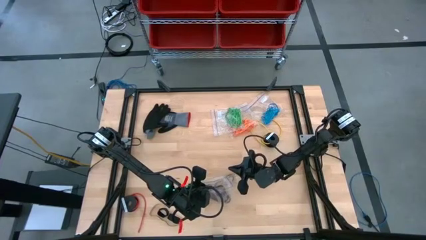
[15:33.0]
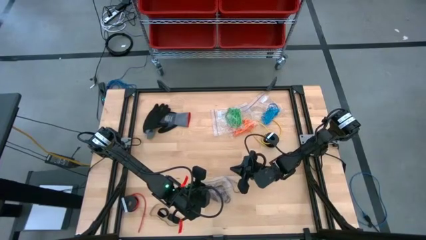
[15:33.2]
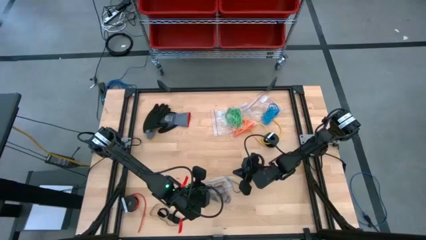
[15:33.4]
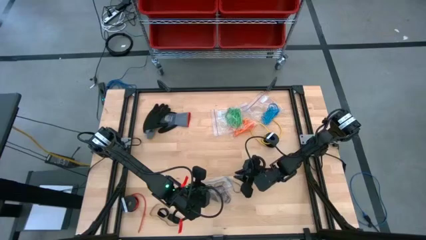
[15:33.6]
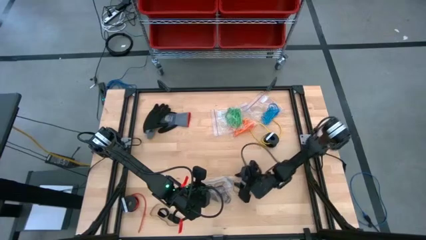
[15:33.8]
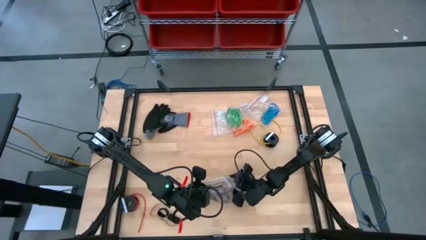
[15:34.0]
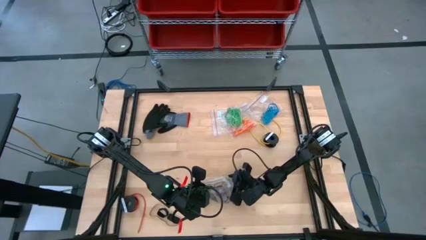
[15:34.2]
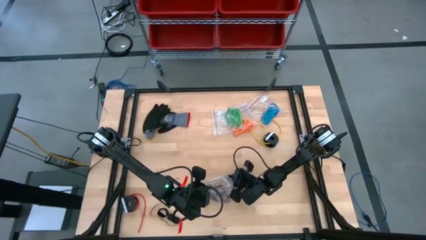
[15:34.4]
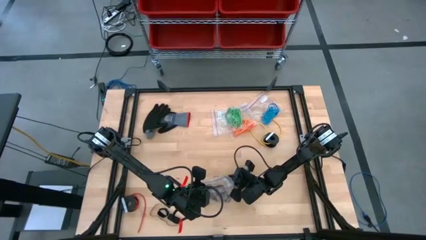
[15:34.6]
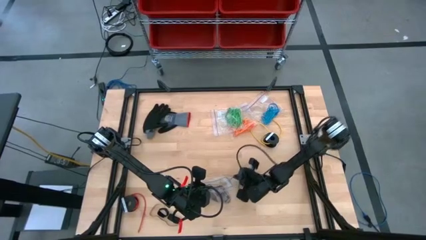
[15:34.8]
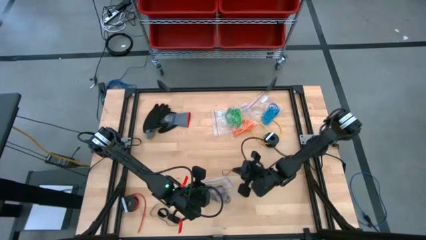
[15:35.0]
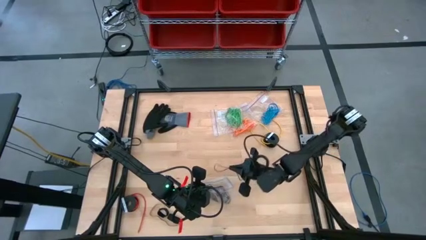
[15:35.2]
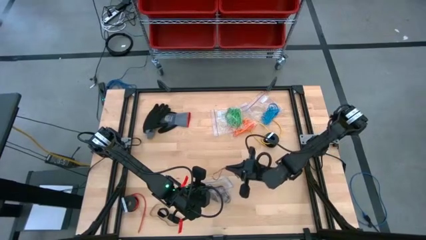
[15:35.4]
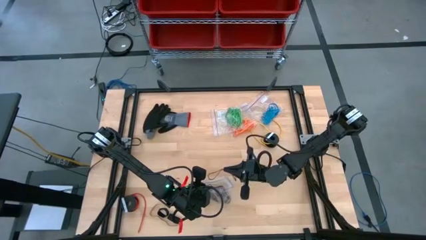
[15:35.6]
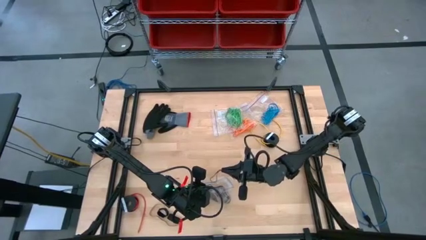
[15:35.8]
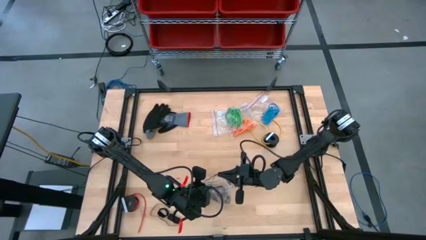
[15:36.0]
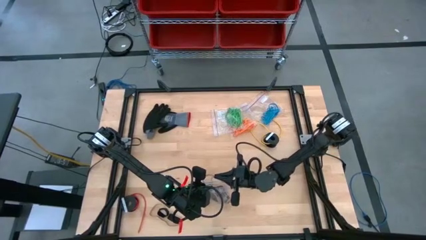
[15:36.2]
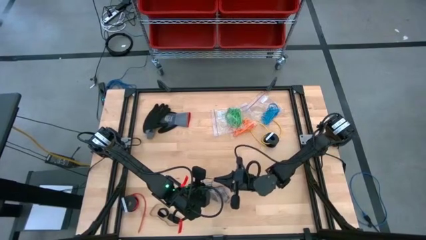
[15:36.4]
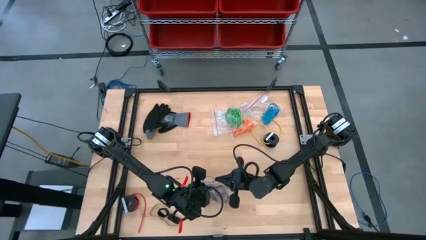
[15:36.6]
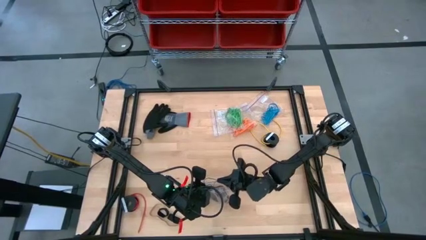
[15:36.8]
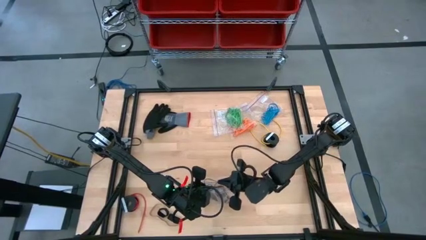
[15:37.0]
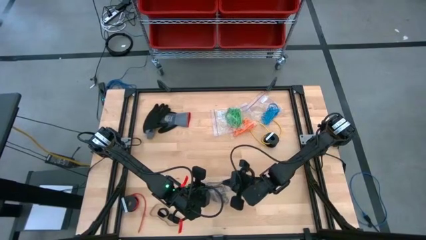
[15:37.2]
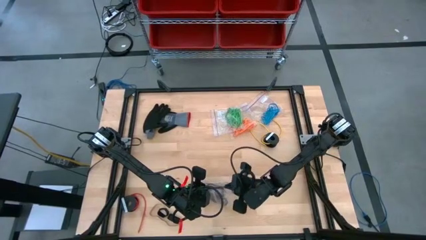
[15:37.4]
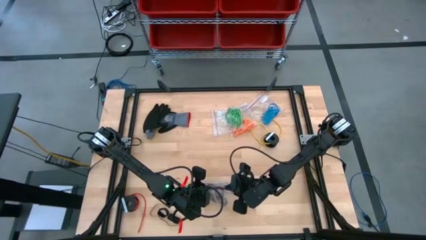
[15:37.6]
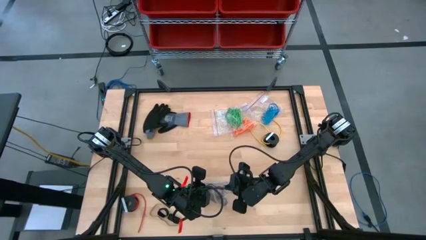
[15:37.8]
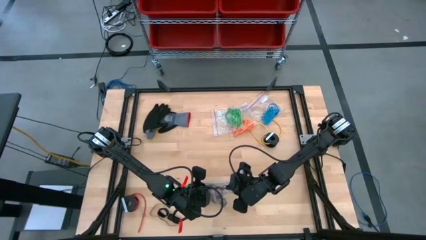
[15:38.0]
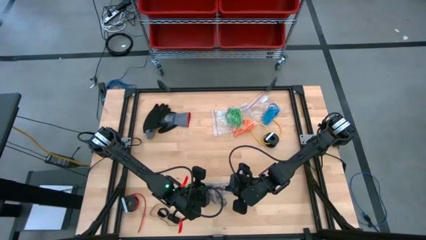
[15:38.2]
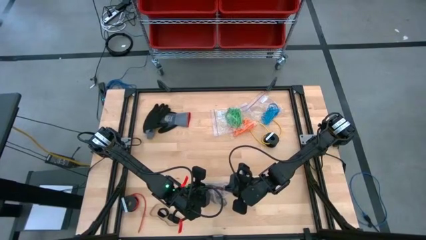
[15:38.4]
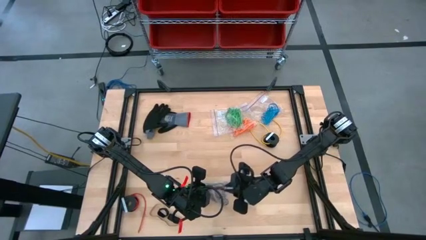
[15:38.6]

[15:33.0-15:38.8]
Task: Sort rubber bands
Put the black rubber band into the transparent zip bag

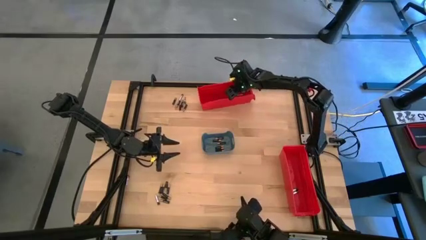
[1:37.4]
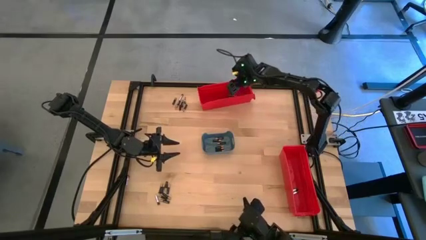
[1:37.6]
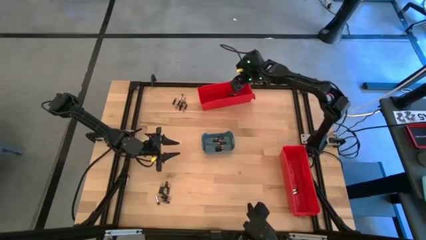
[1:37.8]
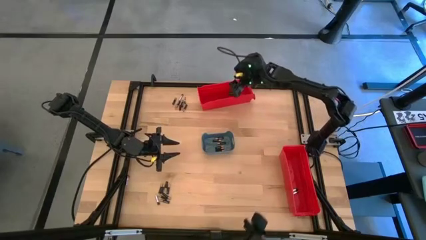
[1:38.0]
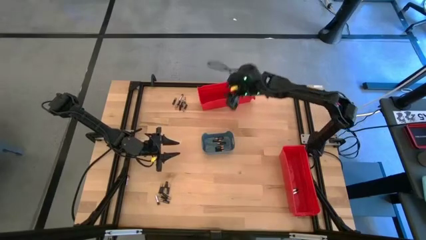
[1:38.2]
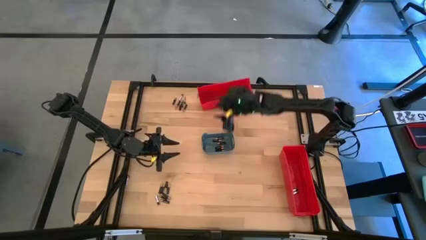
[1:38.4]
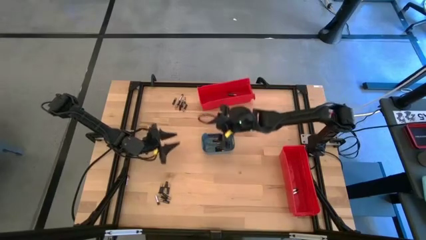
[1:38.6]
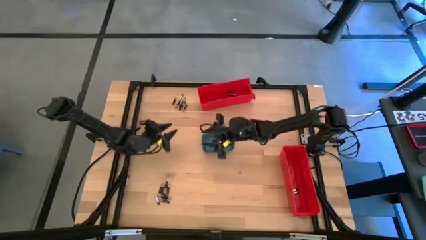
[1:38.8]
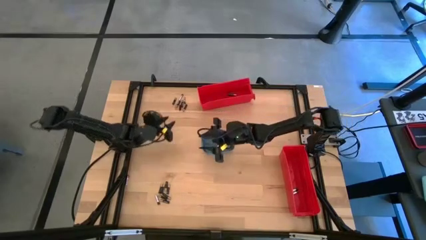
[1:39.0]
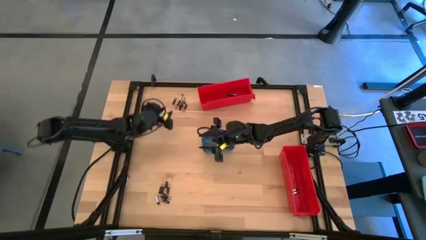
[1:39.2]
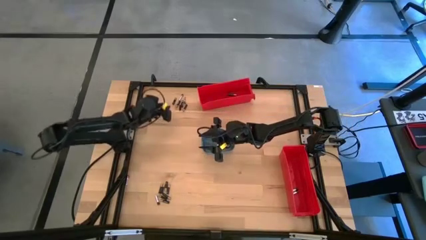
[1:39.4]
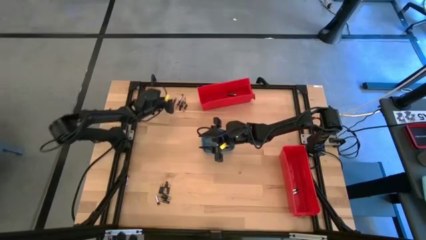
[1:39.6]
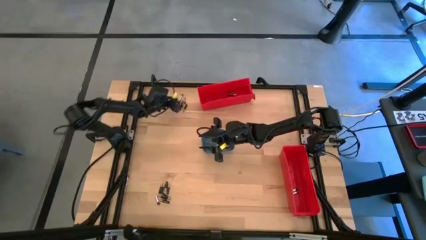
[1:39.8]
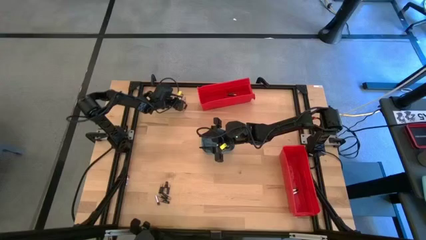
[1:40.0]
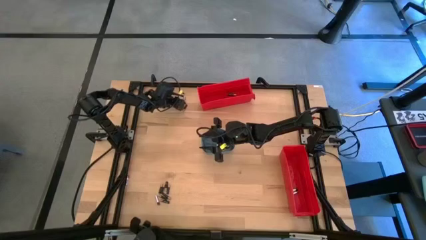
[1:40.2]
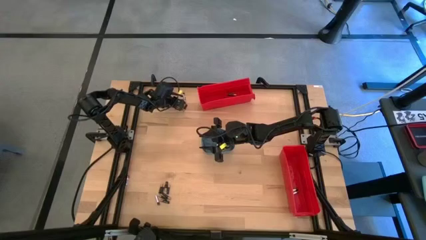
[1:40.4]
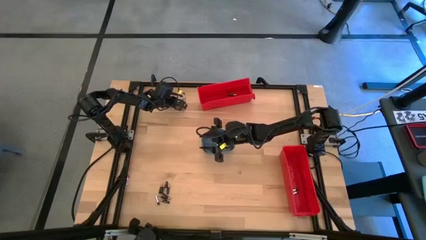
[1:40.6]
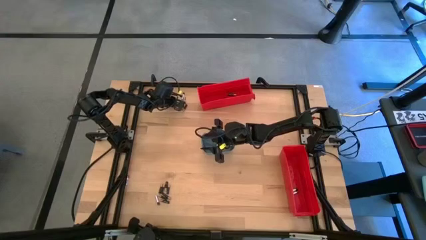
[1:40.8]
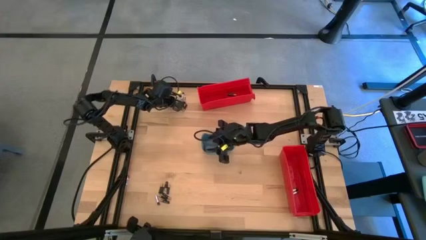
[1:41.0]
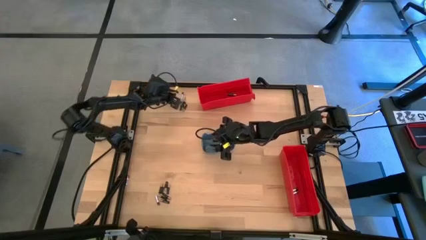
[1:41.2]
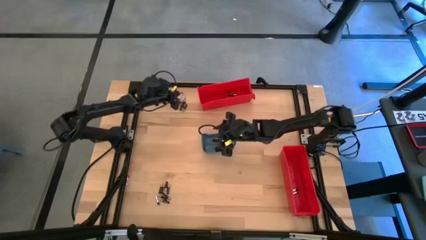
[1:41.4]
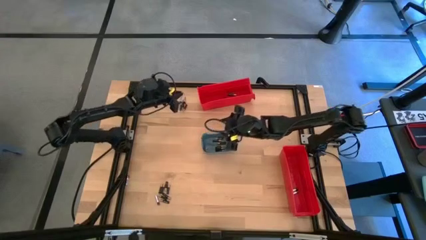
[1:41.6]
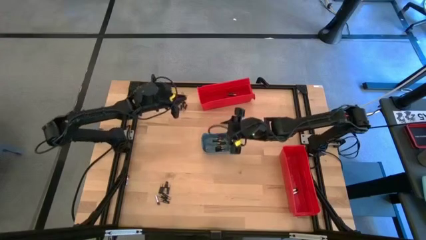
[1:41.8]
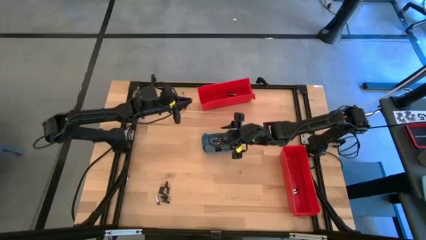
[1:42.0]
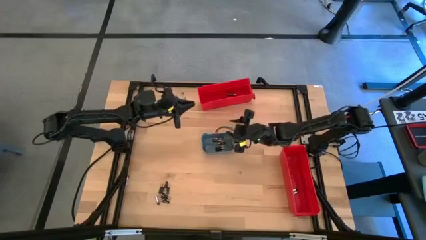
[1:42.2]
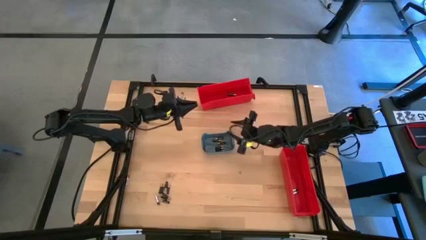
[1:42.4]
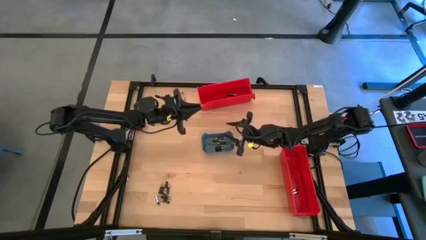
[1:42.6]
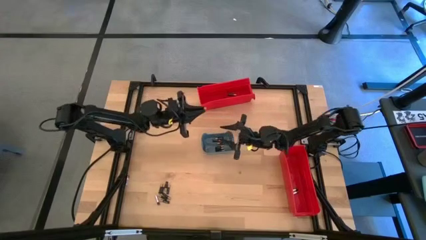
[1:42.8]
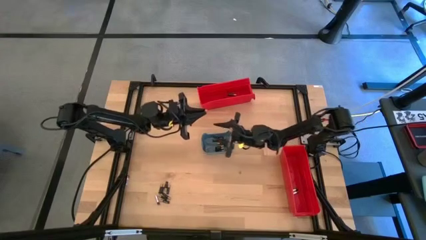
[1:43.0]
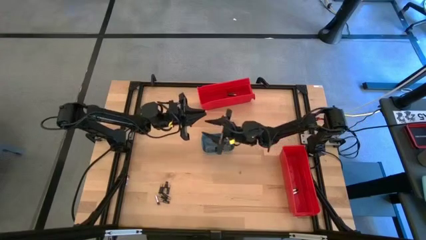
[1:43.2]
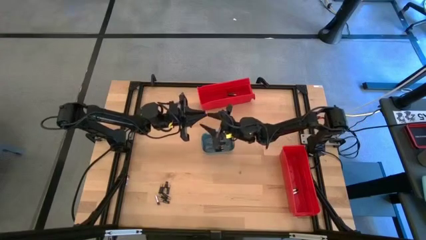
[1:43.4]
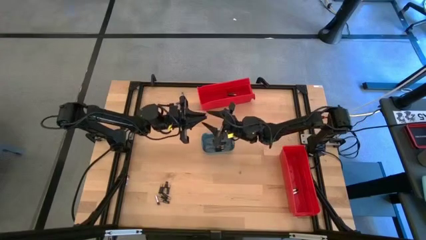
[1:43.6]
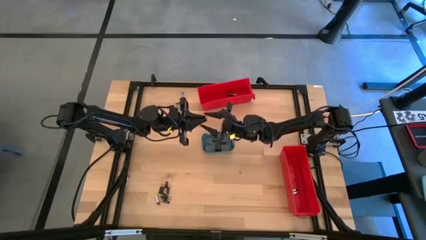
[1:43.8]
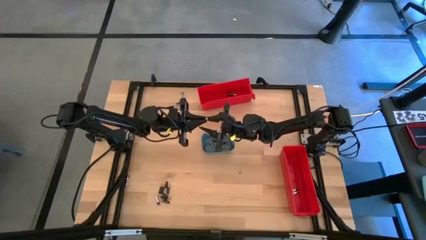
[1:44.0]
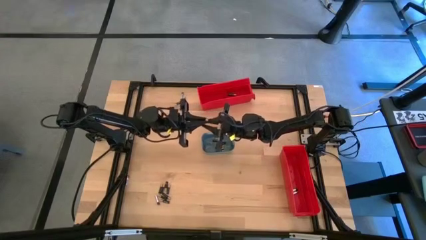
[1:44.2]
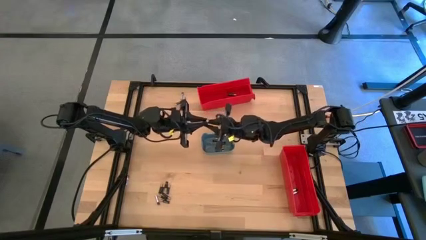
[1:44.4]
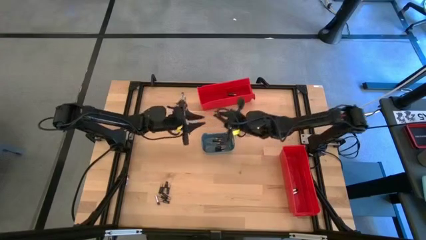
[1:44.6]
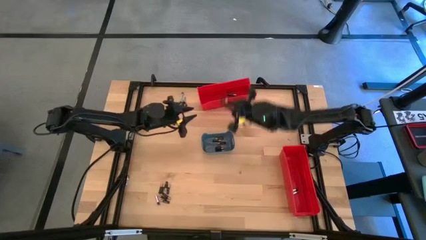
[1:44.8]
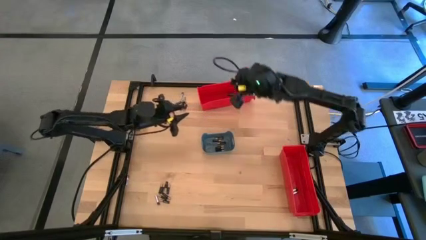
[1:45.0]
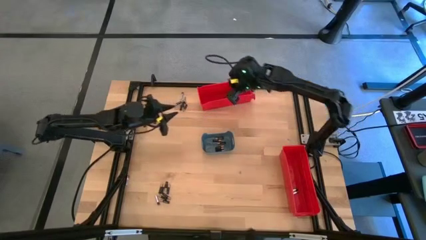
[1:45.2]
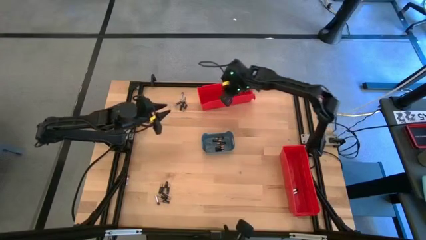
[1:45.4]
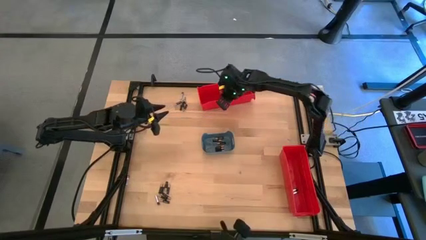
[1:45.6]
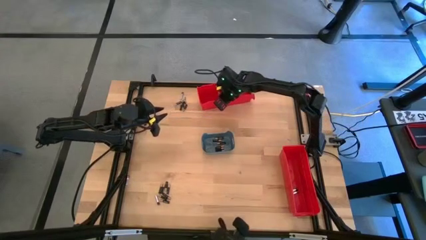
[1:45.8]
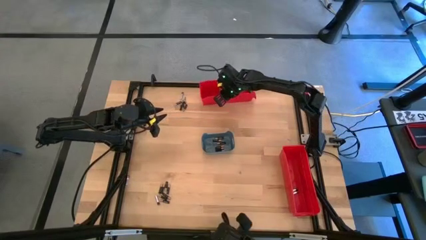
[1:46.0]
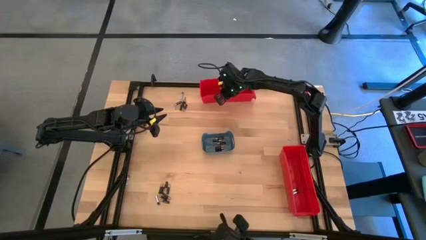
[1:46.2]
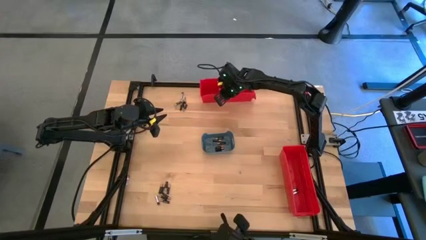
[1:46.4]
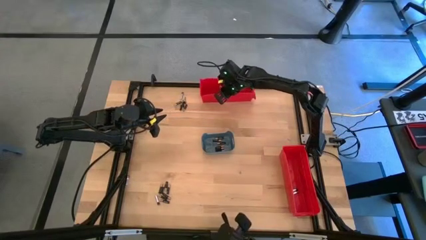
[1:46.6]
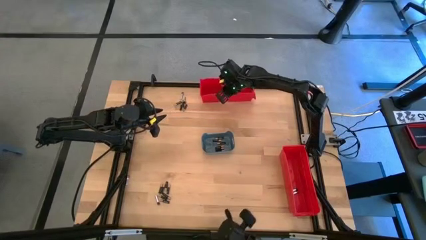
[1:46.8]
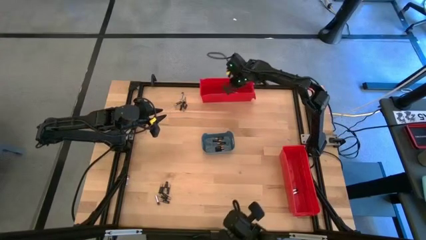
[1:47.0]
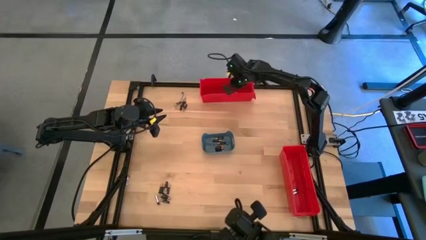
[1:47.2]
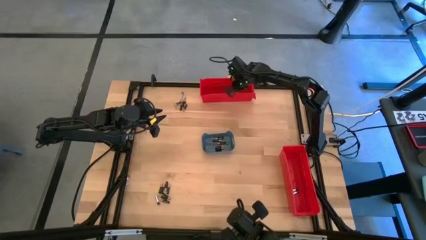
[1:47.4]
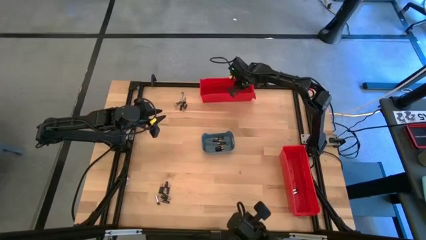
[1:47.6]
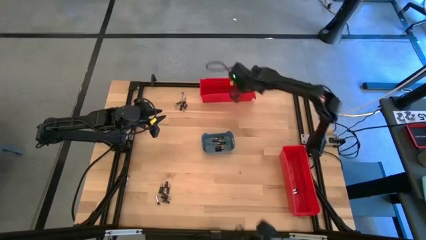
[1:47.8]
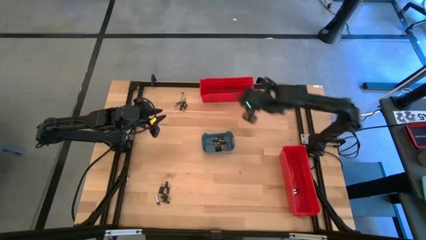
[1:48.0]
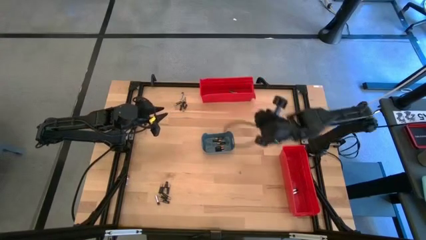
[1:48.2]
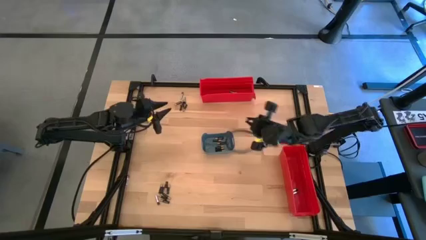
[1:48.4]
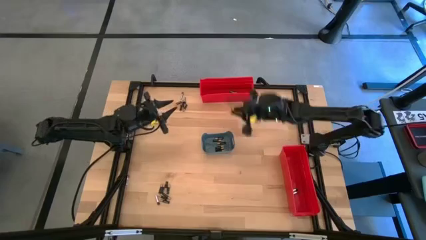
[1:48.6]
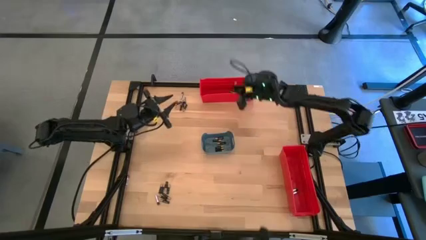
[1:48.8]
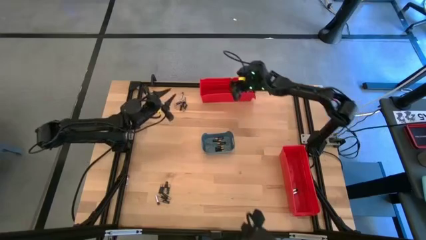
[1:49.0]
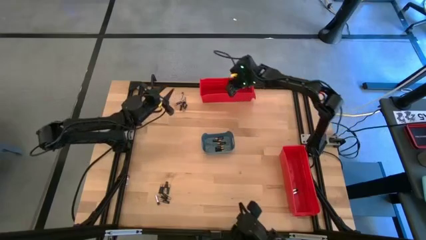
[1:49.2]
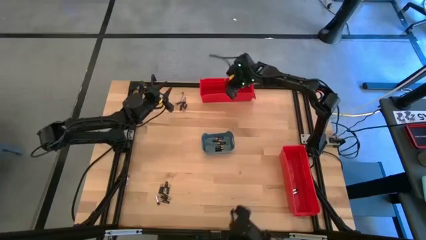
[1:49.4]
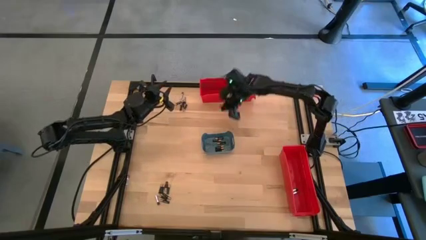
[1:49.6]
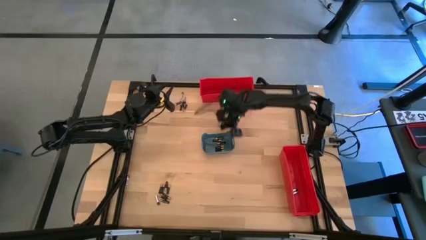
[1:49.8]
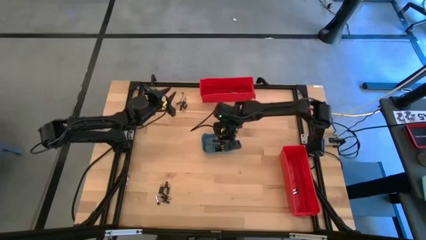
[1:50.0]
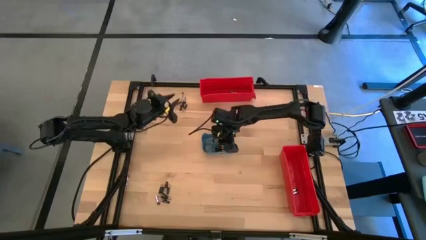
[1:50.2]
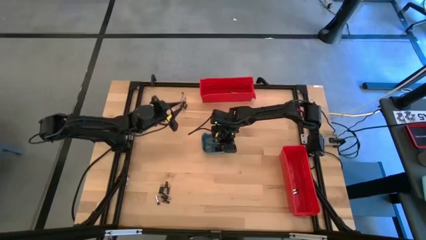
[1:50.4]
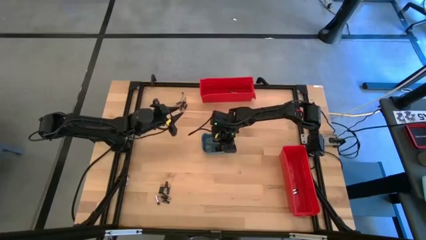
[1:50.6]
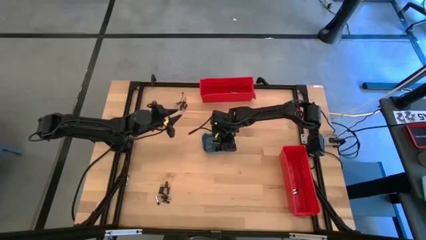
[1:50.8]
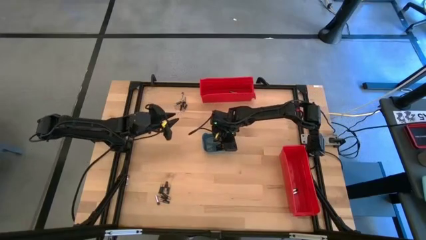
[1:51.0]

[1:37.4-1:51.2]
Task: Sort batteries
Put the black battery into the blue bin
